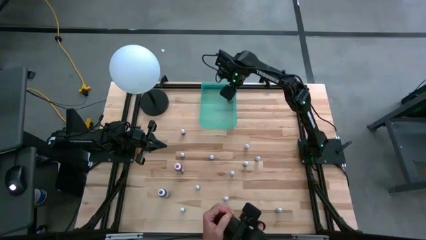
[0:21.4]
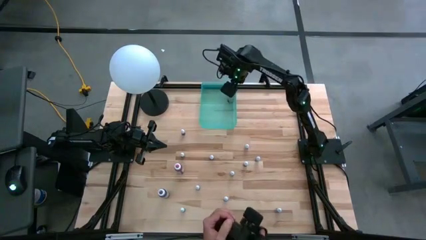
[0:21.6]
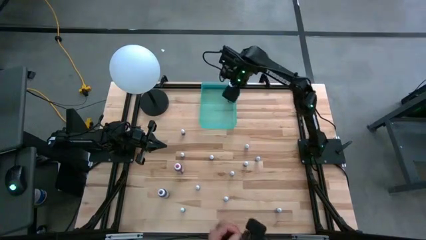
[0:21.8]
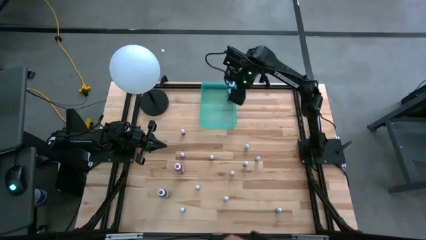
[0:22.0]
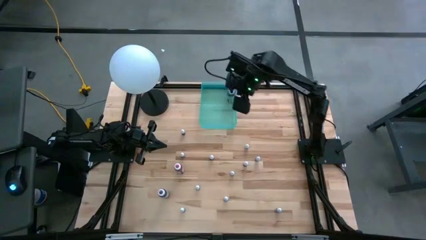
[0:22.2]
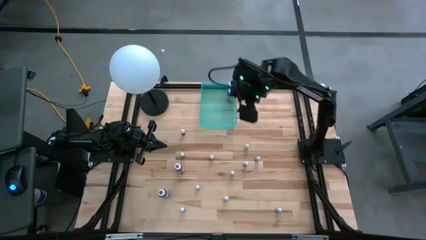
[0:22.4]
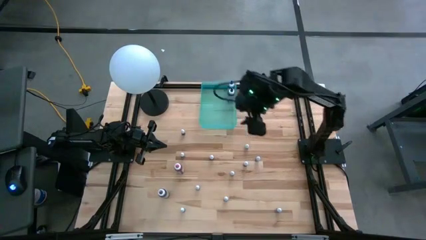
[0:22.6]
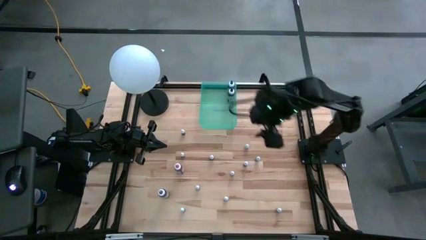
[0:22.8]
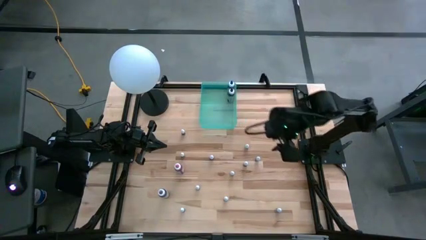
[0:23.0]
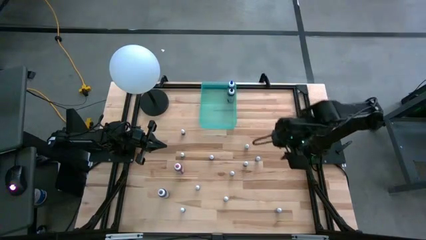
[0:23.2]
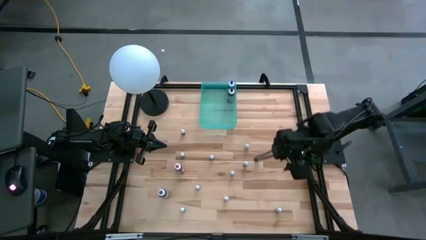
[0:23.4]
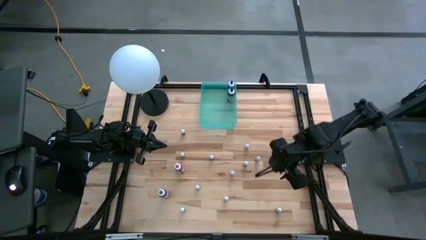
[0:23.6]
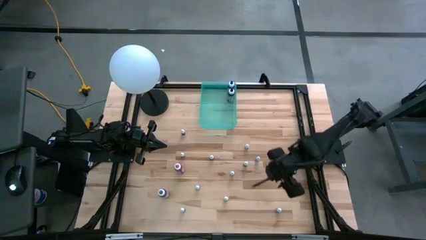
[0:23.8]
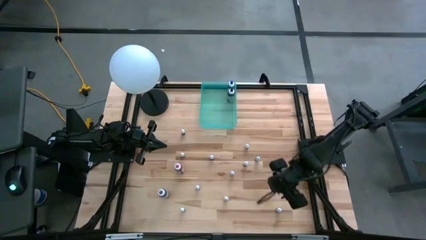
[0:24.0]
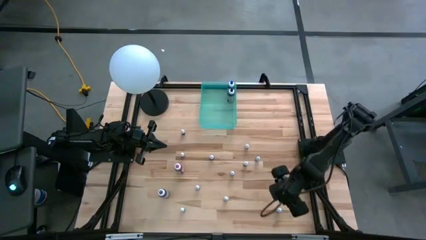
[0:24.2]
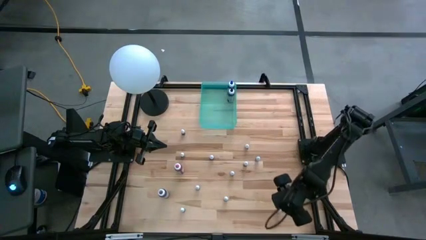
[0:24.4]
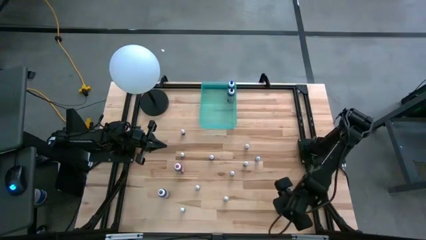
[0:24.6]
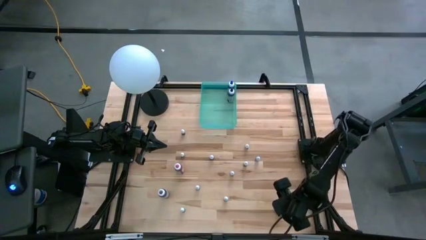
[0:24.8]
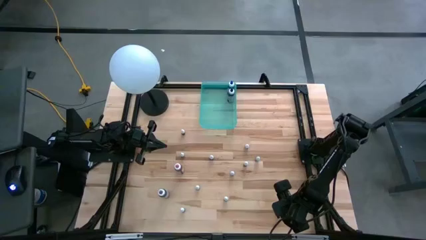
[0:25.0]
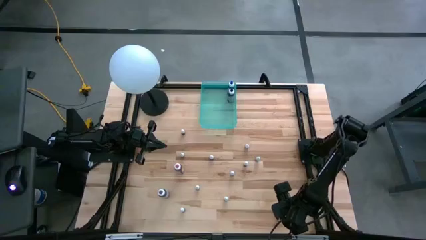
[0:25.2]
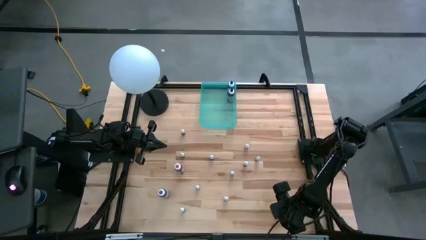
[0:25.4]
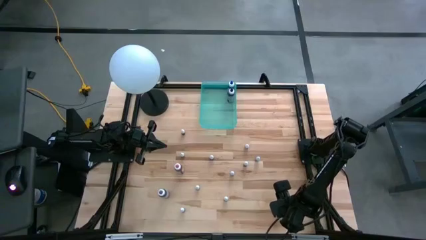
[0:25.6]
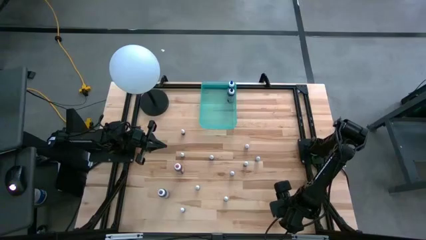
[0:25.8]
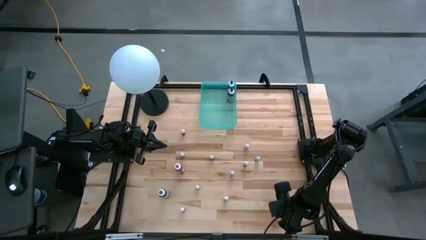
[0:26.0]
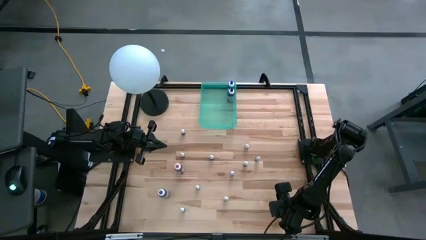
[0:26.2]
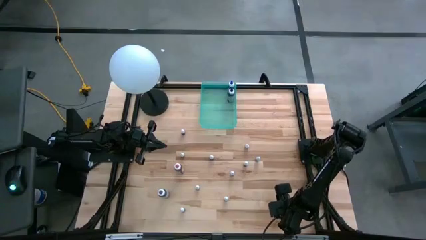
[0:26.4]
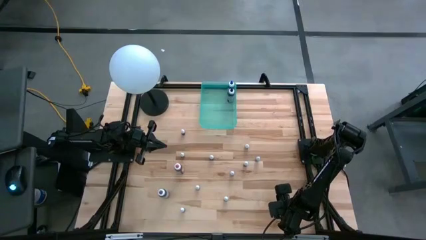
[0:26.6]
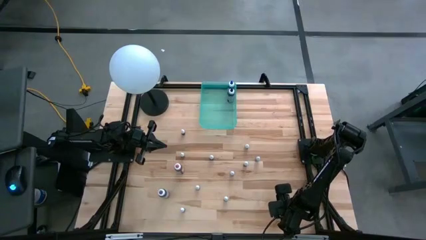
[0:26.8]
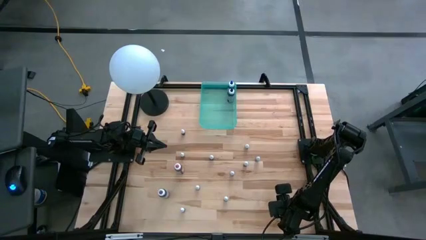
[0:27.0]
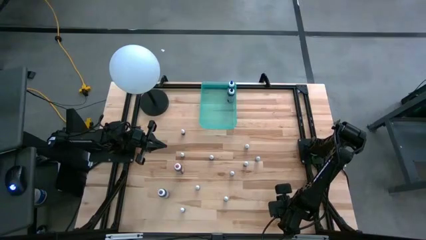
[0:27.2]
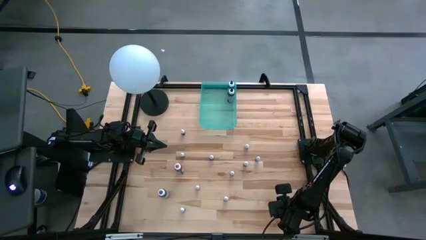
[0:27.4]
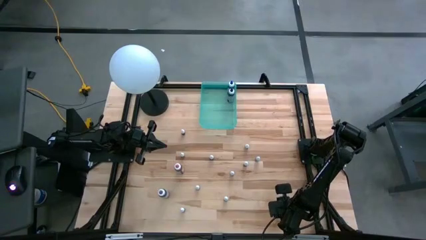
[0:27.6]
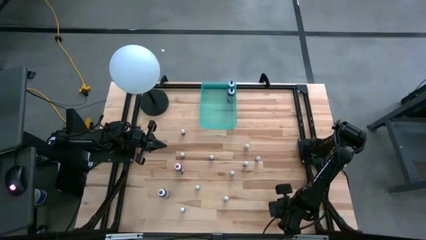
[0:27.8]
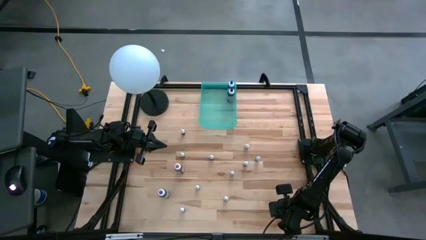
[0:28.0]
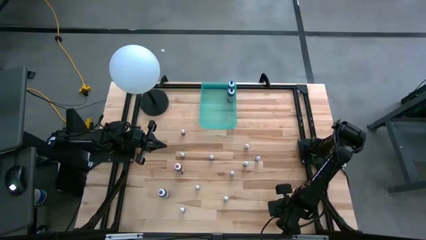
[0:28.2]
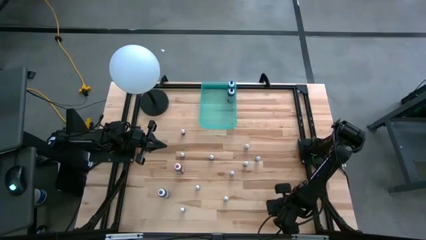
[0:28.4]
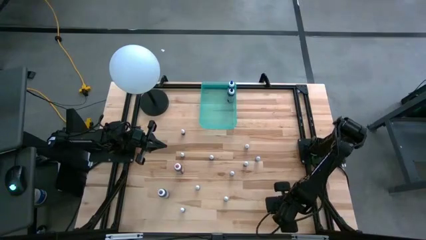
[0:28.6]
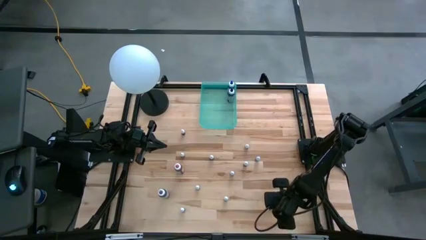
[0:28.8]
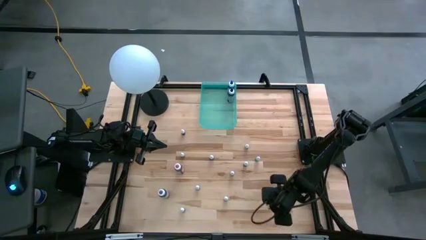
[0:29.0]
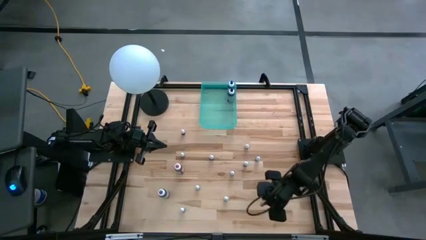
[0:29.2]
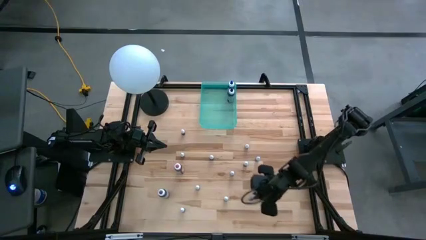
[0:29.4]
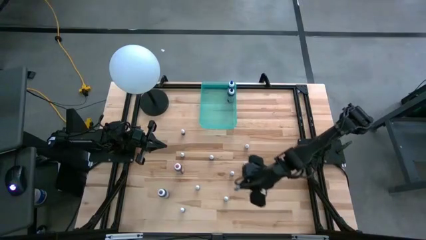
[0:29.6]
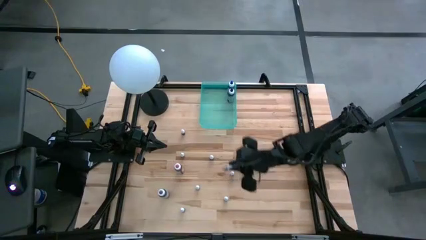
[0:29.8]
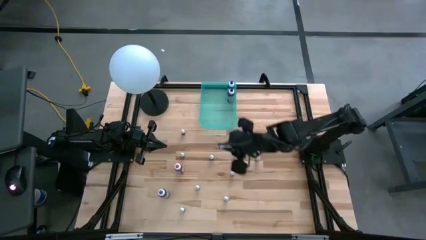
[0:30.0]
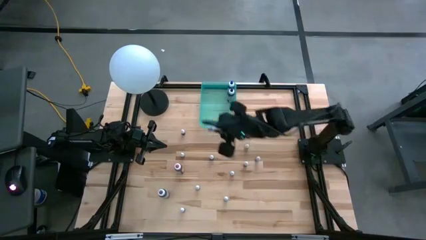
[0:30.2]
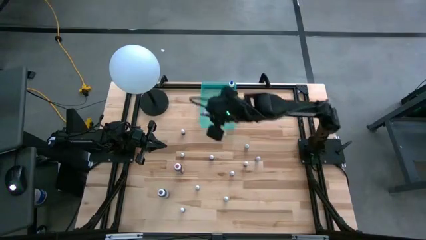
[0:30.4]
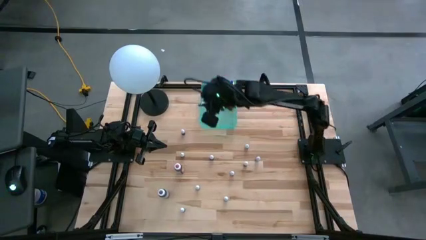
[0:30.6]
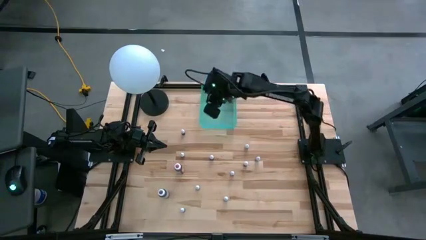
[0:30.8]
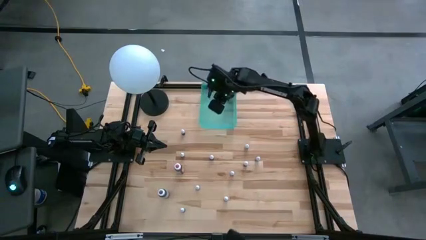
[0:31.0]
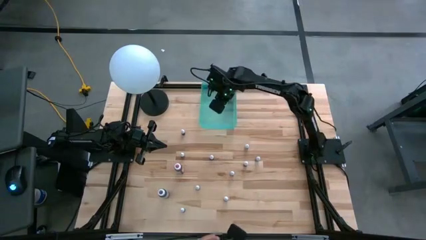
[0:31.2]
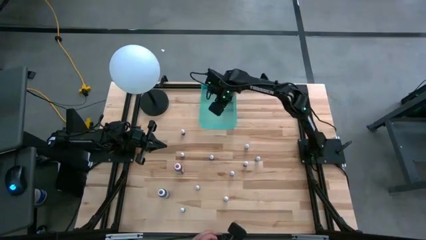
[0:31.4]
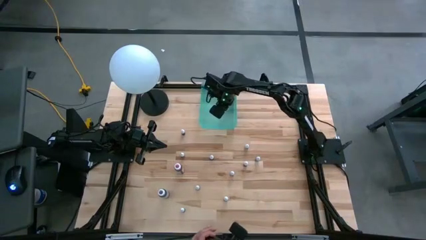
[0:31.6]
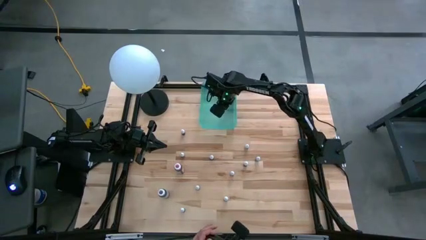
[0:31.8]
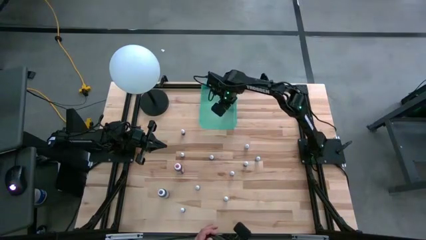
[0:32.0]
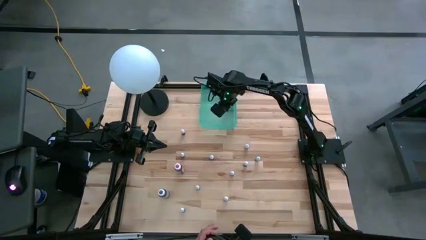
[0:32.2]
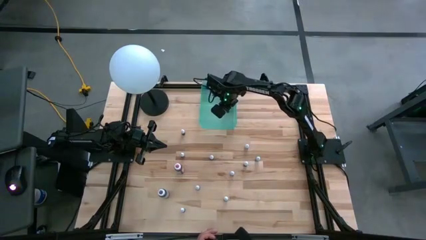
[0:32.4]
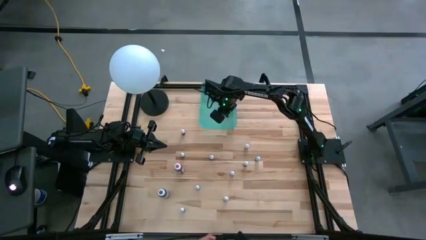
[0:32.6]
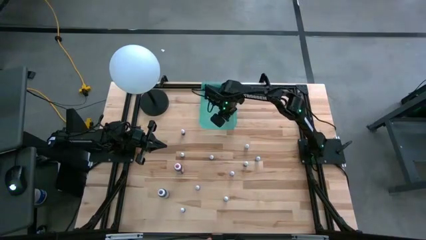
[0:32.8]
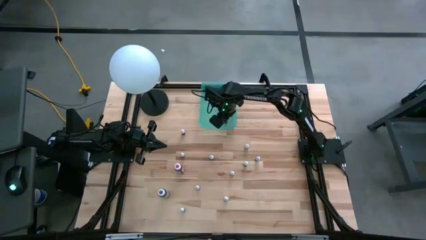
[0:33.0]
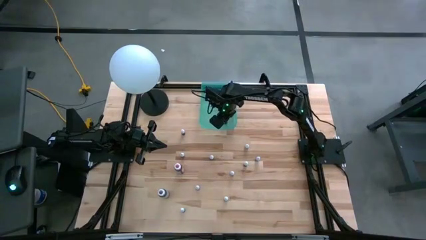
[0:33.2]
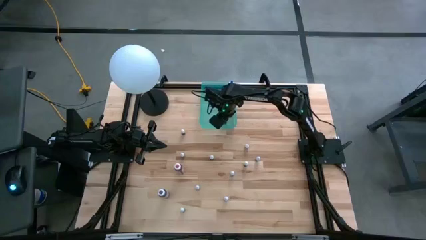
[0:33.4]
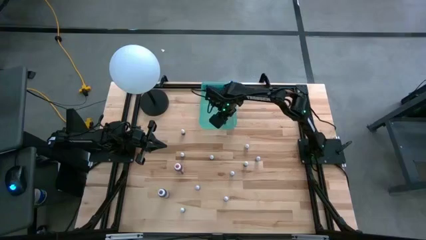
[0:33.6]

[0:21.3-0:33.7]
Task: Pick & Place food coloring
Put the red food coloring bottle into the light blue bin

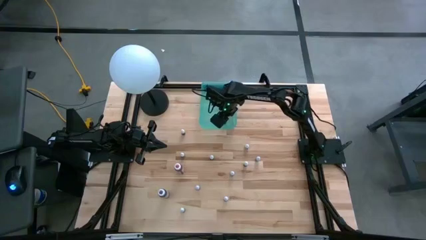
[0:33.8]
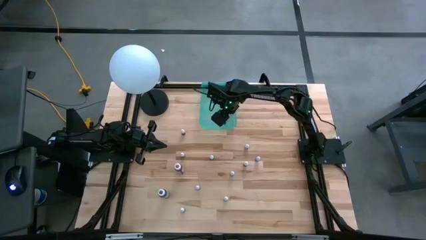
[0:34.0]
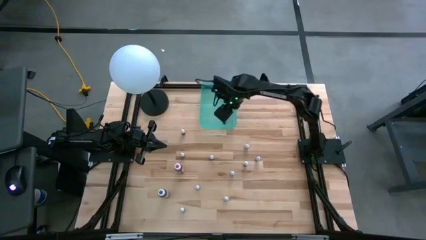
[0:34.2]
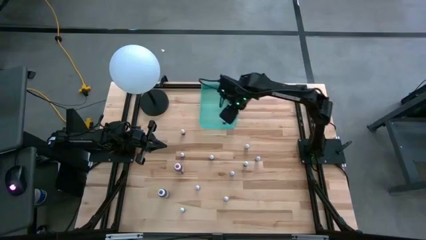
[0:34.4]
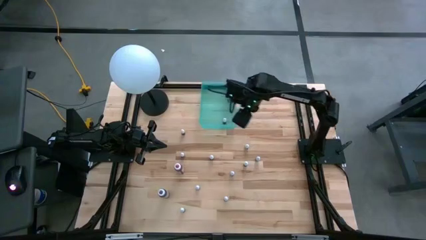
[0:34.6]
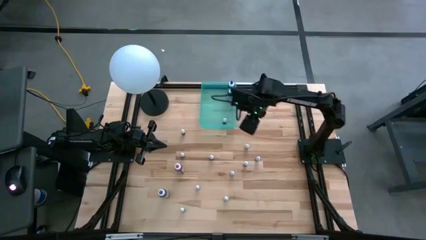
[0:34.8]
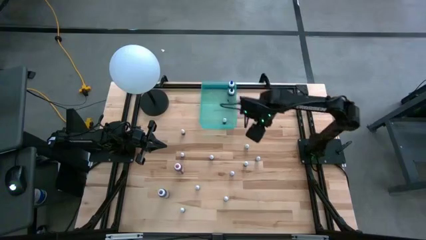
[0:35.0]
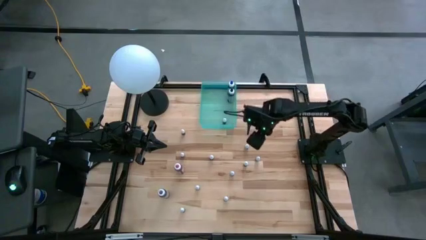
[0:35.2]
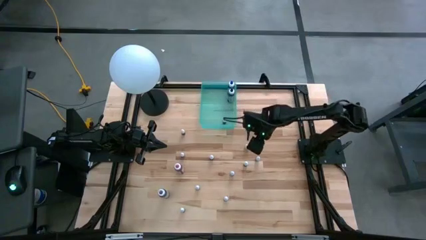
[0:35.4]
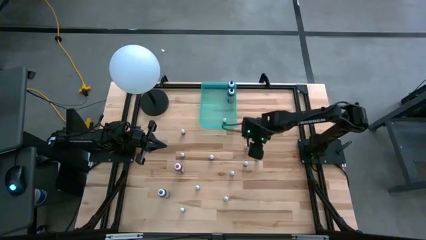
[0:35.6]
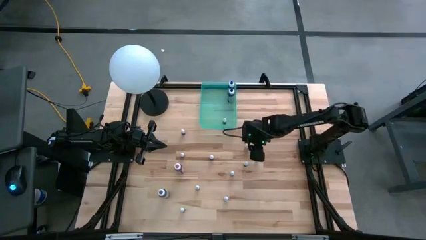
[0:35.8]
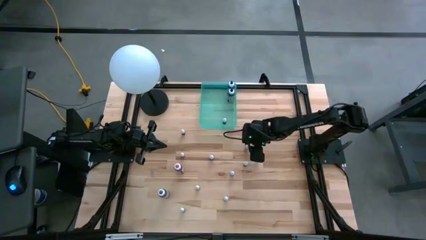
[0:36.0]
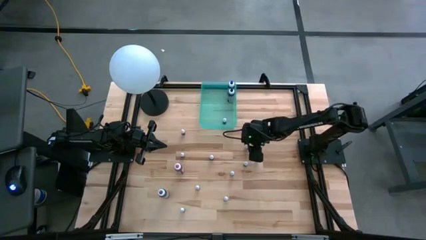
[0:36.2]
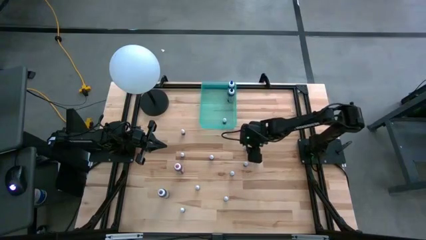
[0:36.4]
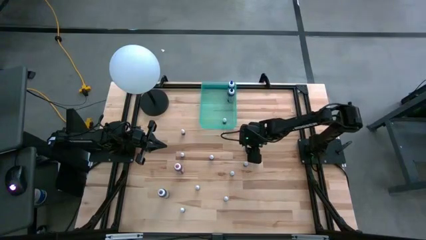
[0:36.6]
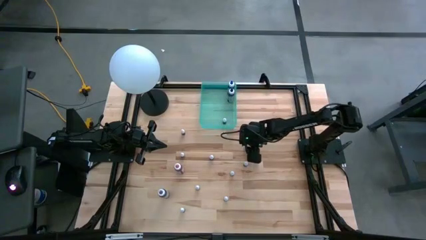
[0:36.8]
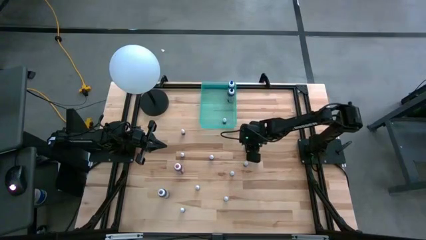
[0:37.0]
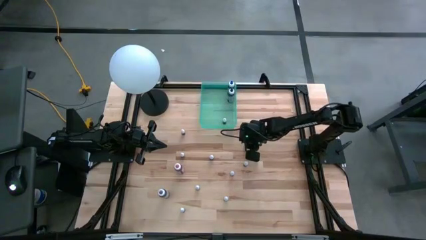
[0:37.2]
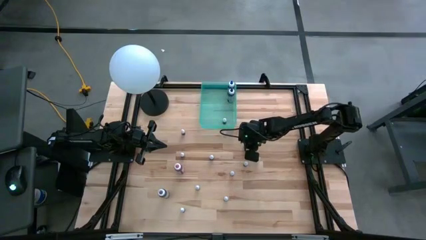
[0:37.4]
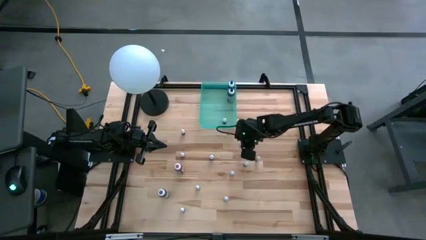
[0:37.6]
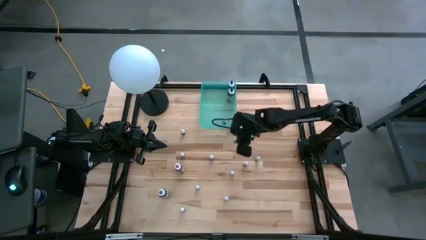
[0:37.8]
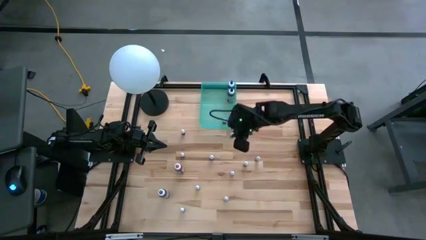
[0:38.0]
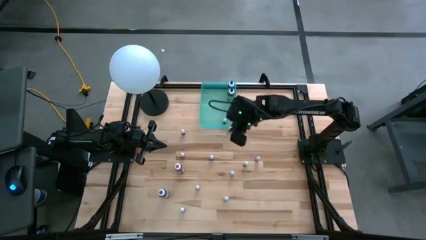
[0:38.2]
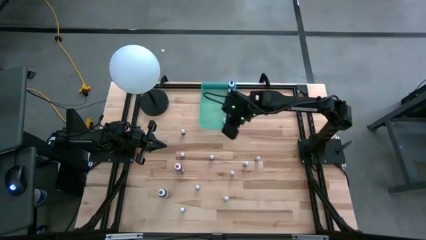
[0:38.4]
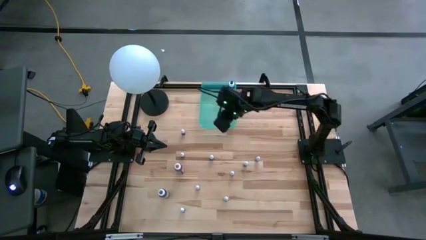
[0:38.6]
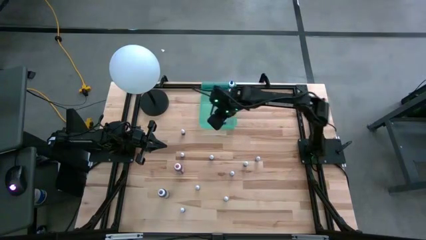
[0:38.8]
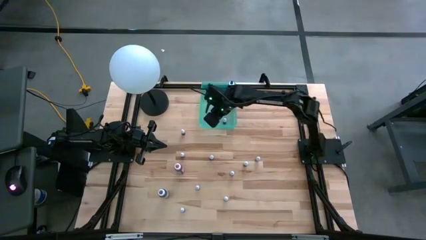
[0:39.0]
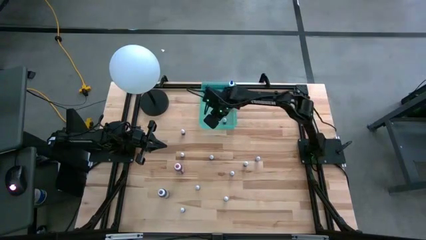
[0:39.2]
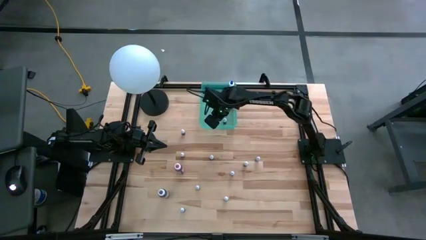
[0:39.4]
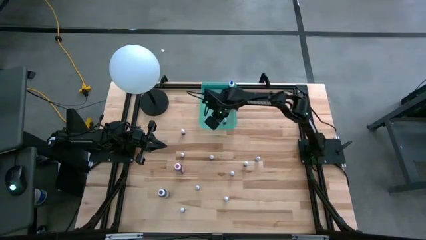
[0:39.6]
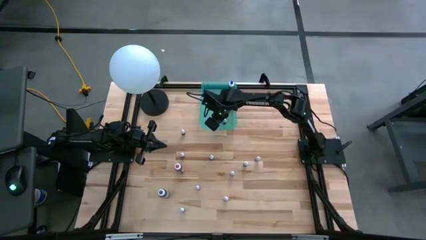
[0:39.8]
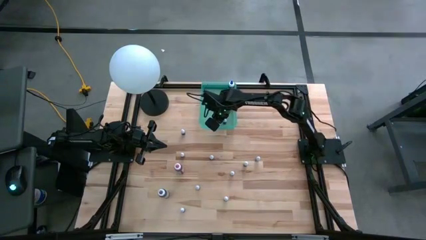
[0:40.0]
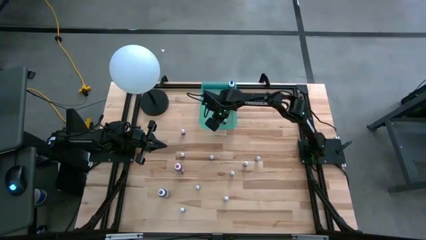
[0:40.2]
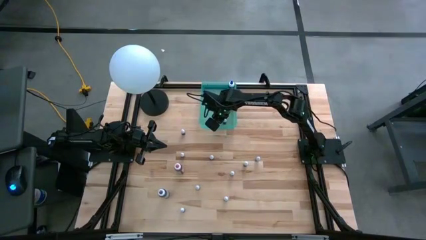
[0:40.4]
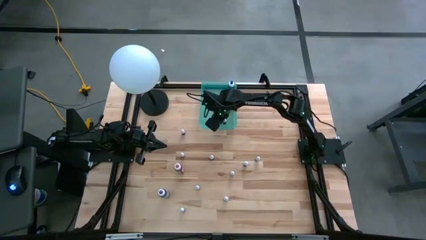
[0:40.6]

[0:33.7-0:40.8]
Put the green food coloring bottle into the light blue bin
